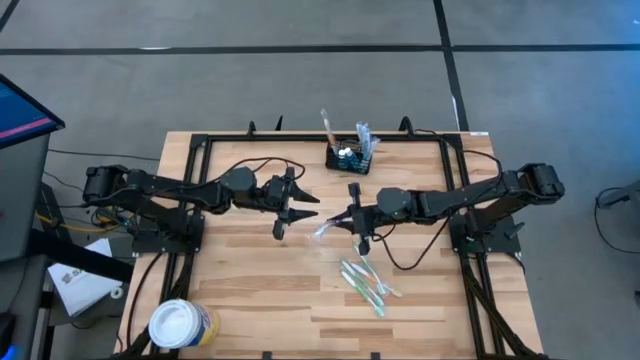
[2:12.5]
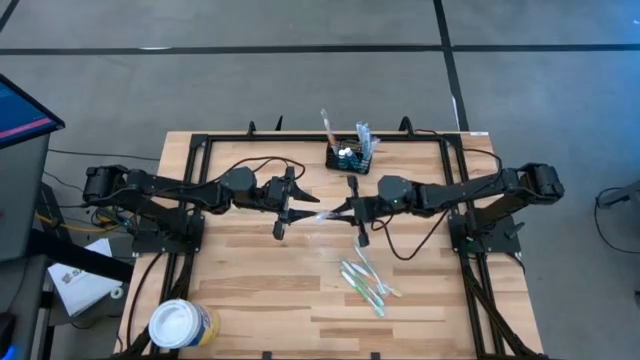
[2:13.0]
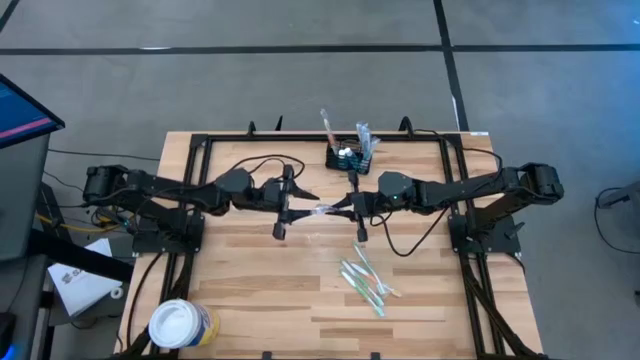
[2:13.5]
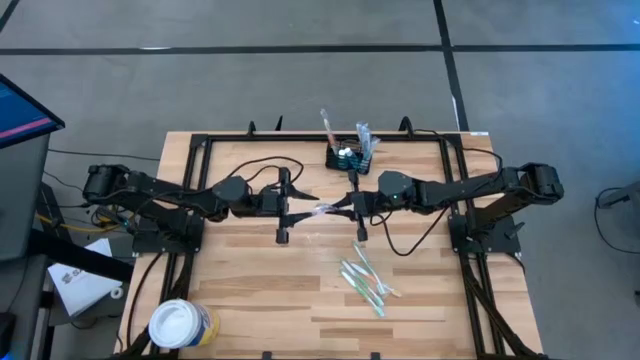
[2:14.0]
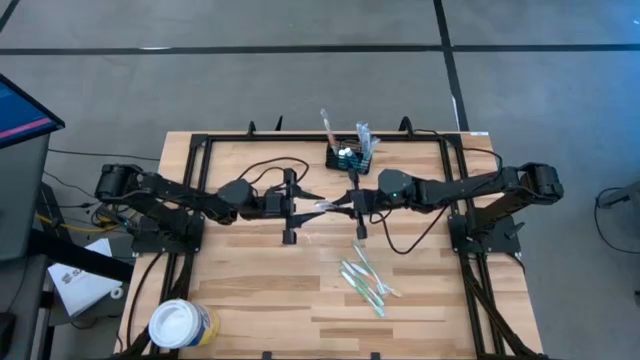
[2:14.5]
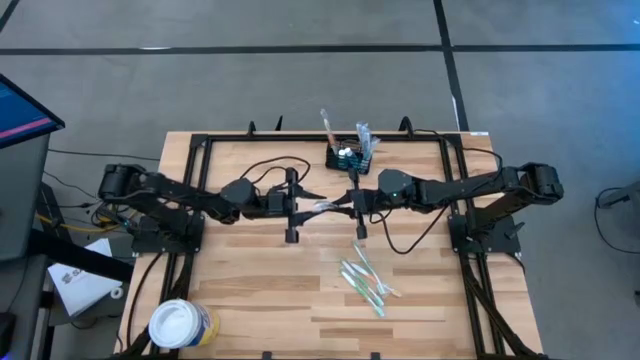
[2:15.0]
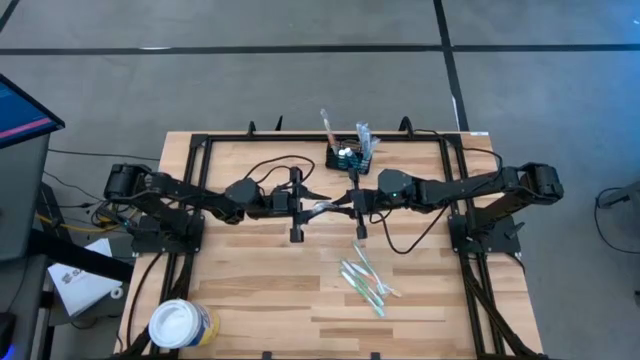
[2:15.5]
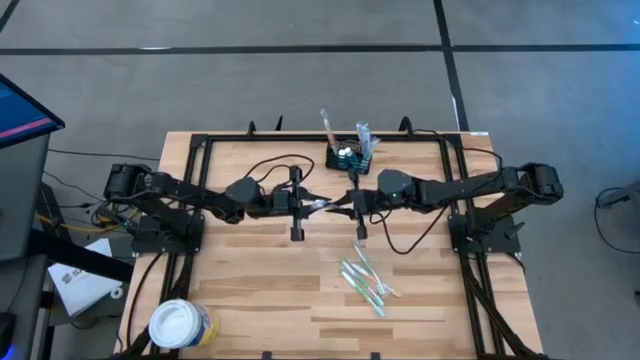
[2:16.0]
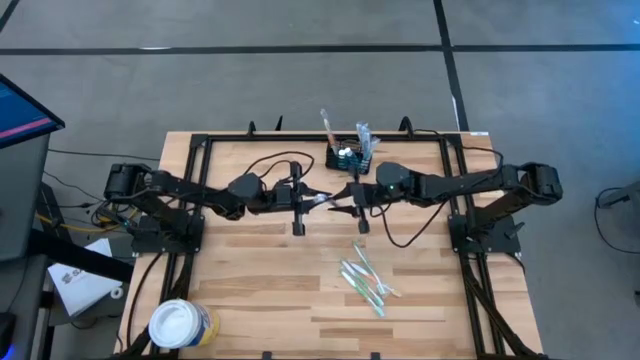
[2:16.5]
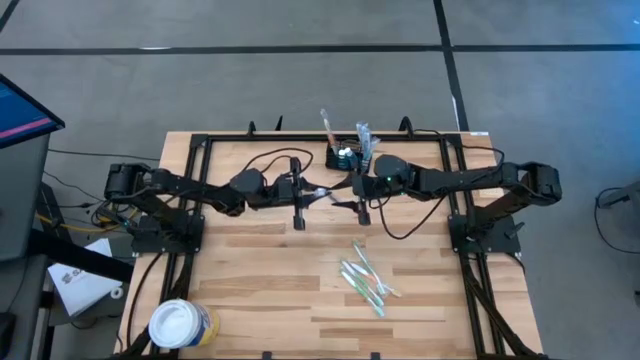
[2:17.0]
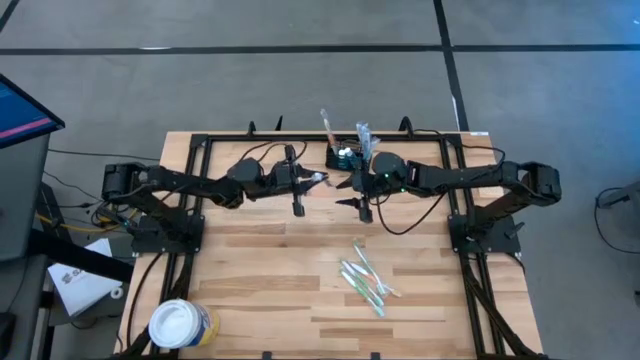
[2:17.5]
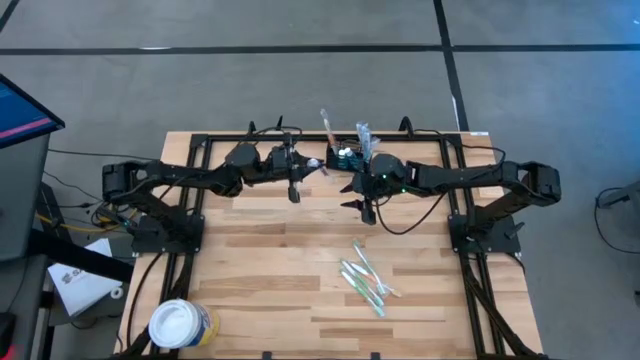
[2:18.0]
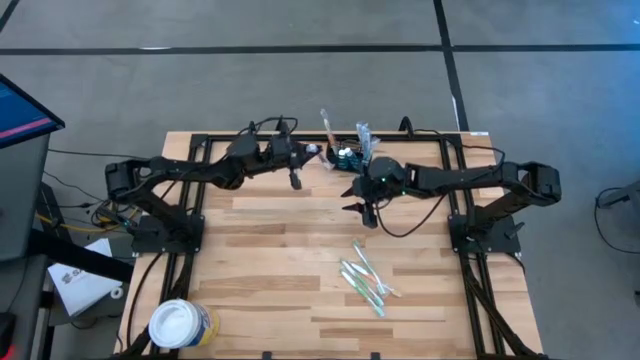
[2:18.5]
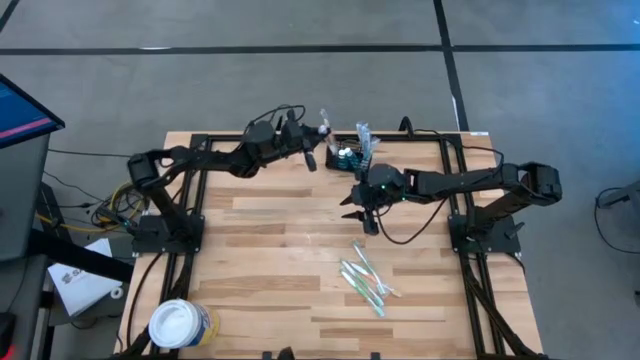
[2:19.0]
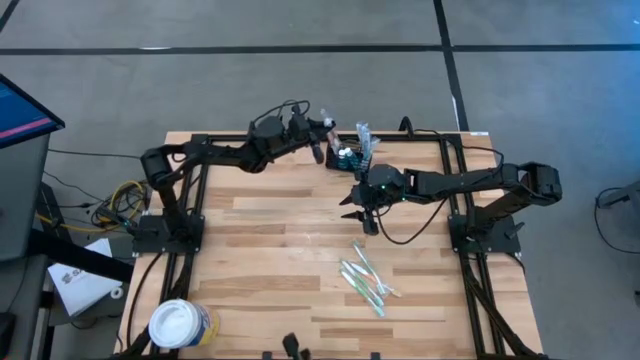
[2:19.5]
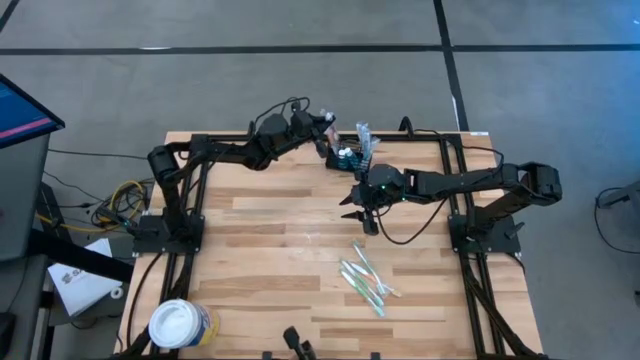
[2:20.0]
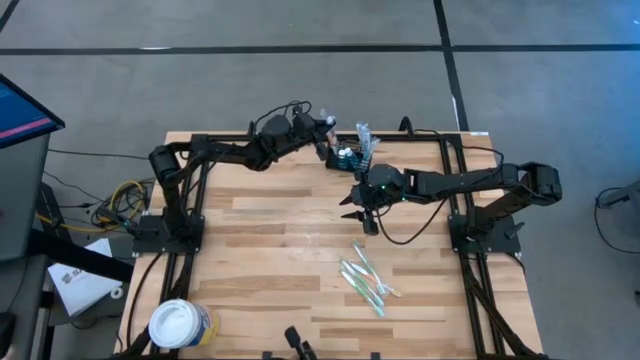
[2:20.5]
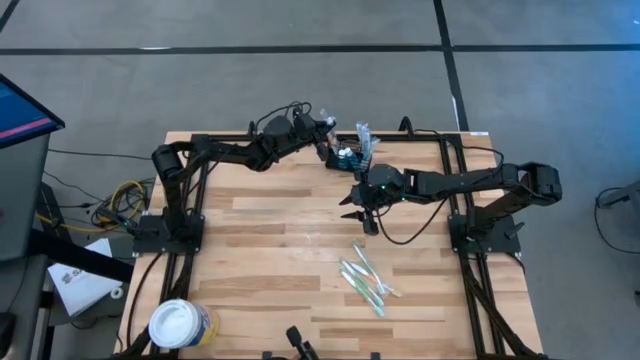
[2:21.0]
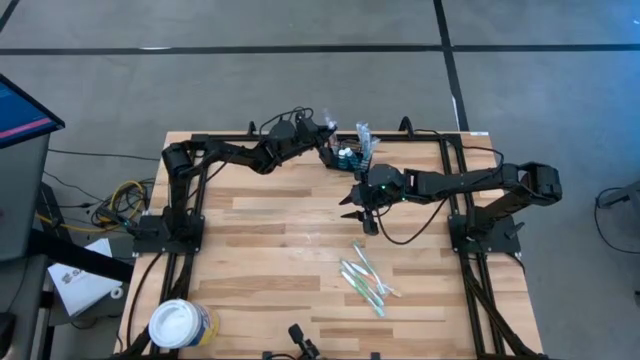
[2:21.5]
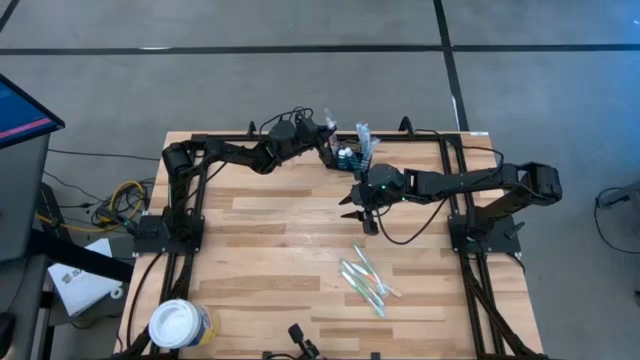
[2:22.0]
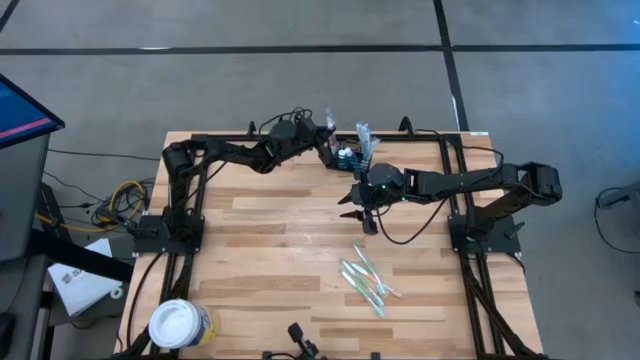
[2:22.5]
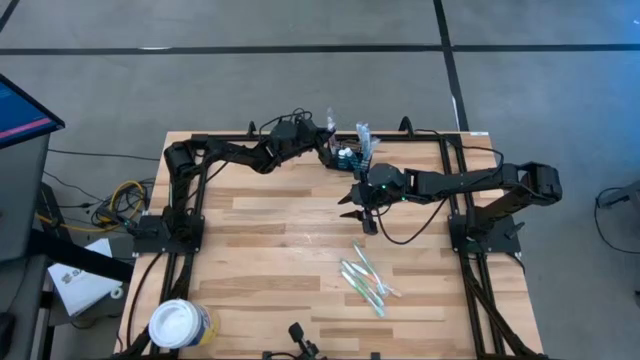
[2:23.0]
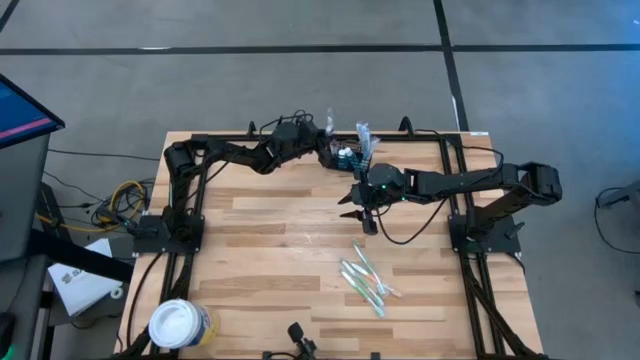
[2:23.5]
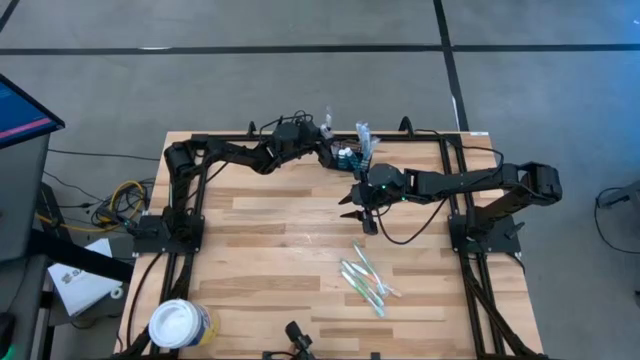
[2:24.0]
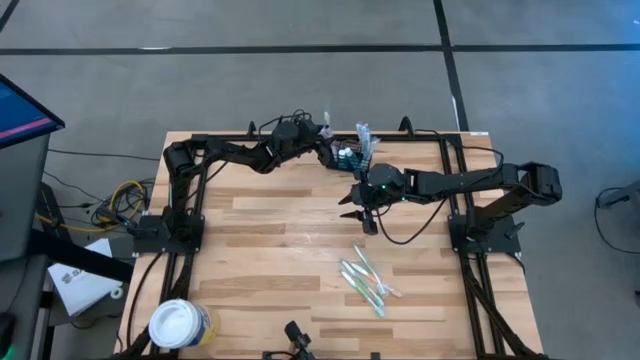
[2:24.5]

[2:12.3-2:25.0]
Task: Pick & Place toothbrushing station
Put the purple toothbrush into the mesh organizer

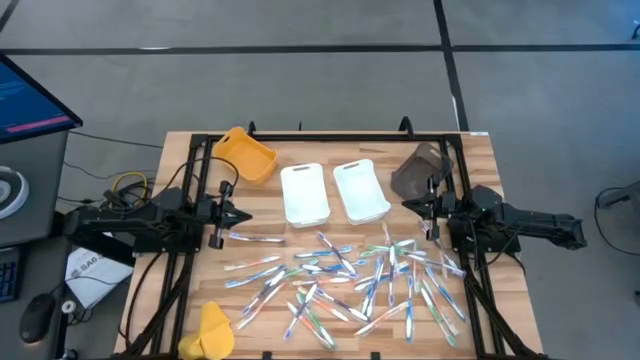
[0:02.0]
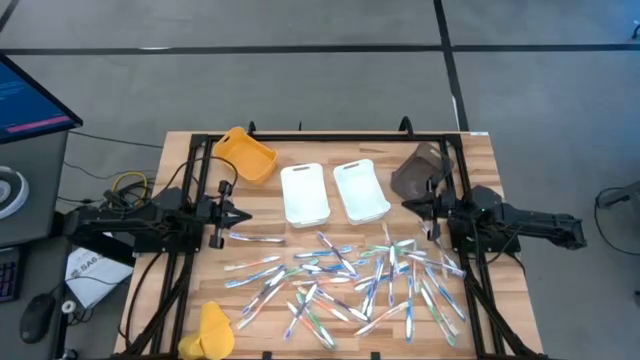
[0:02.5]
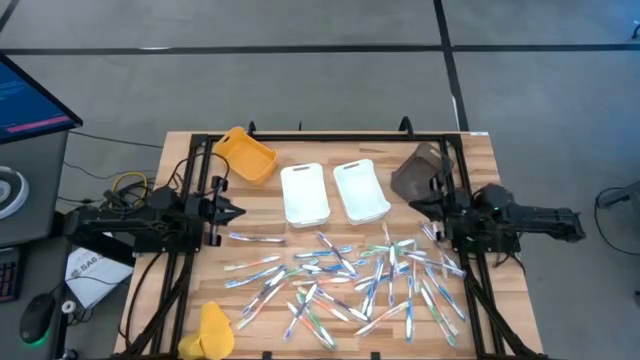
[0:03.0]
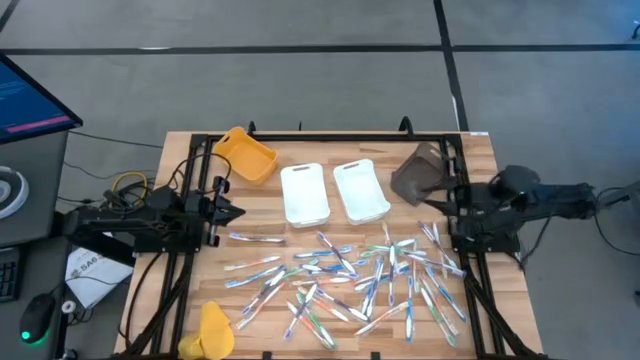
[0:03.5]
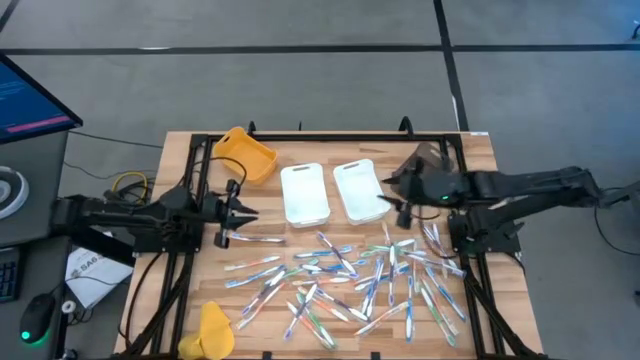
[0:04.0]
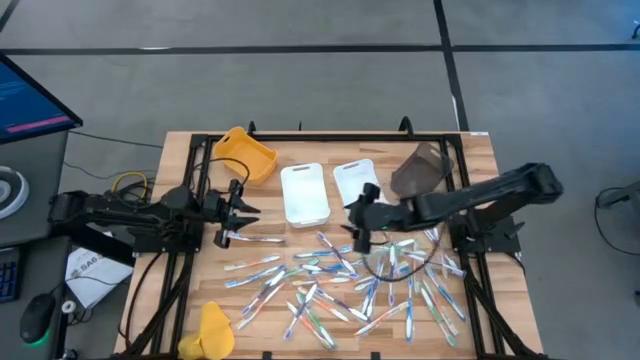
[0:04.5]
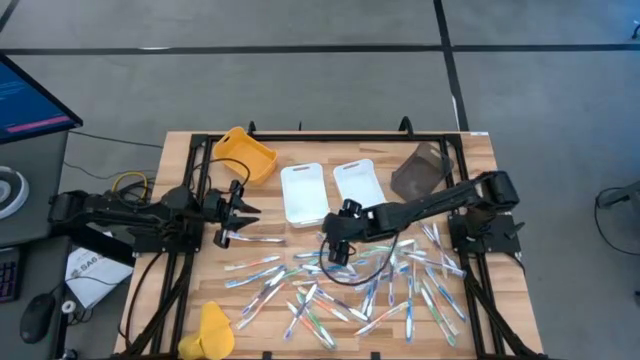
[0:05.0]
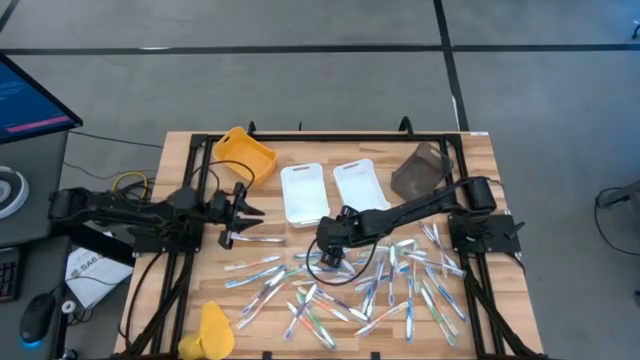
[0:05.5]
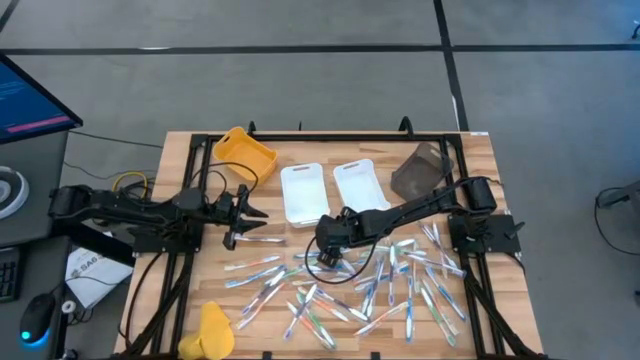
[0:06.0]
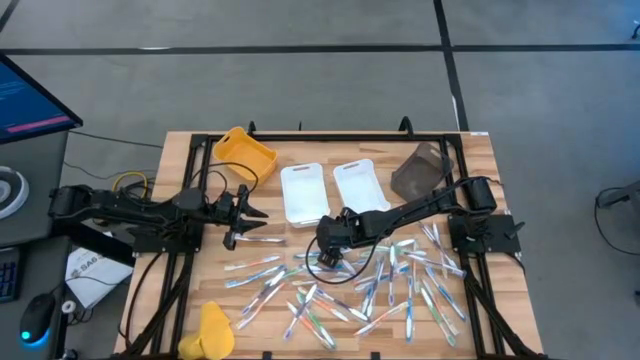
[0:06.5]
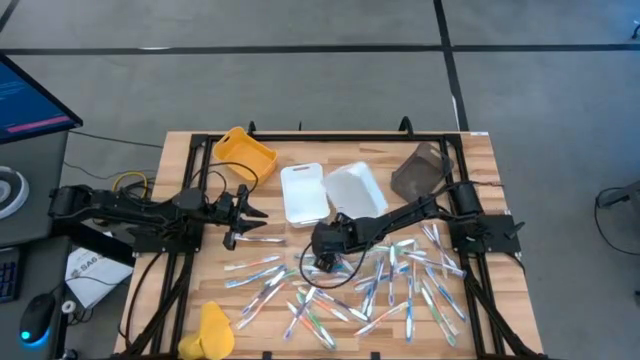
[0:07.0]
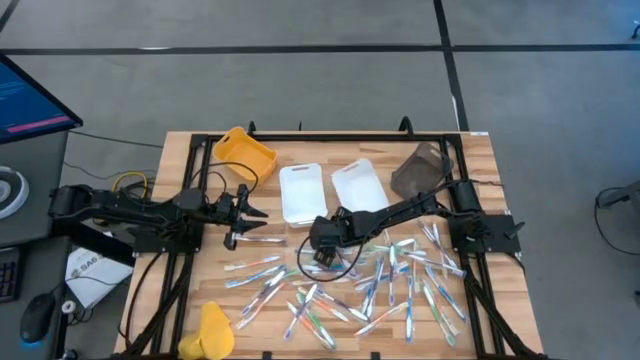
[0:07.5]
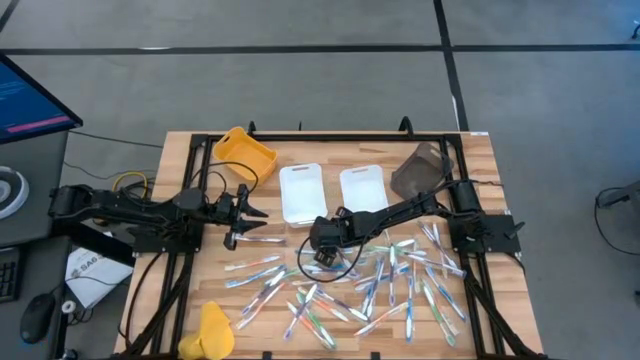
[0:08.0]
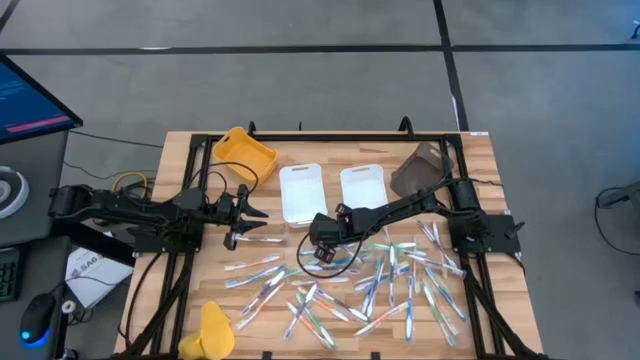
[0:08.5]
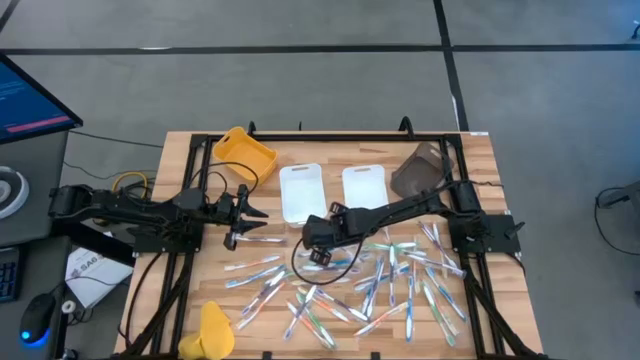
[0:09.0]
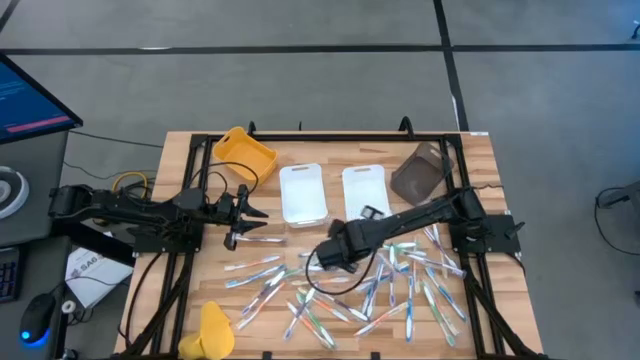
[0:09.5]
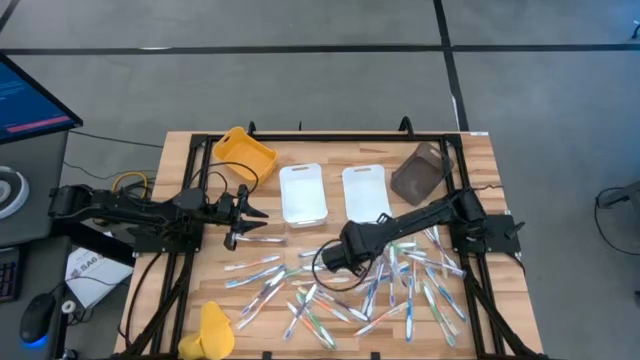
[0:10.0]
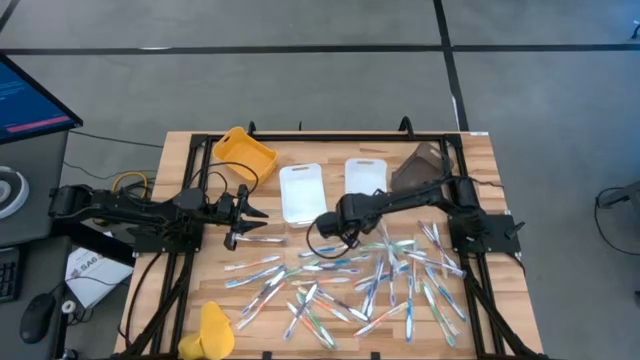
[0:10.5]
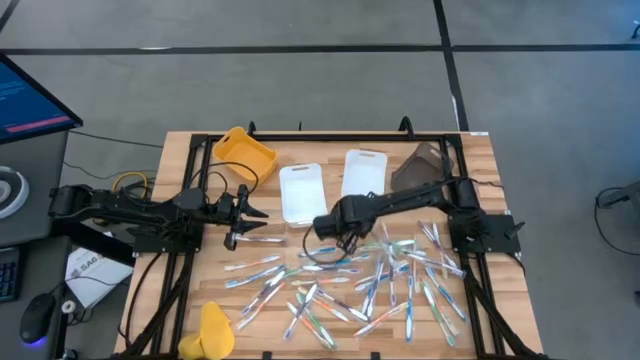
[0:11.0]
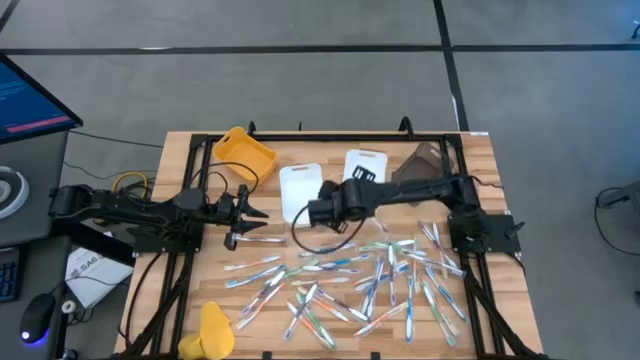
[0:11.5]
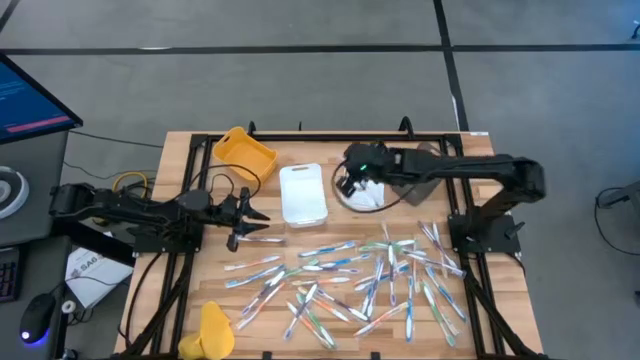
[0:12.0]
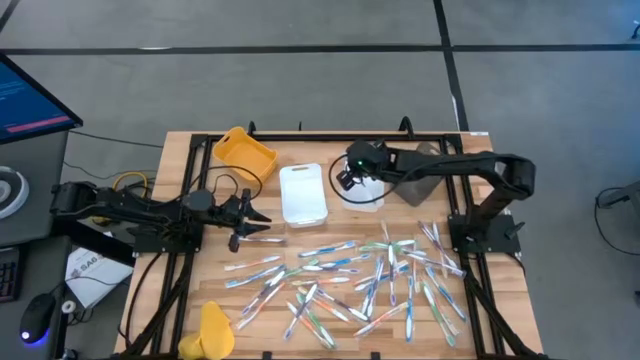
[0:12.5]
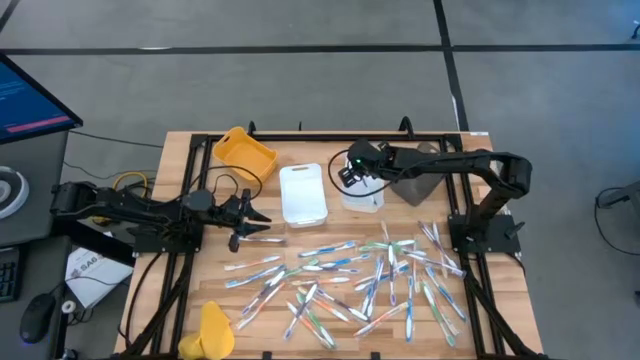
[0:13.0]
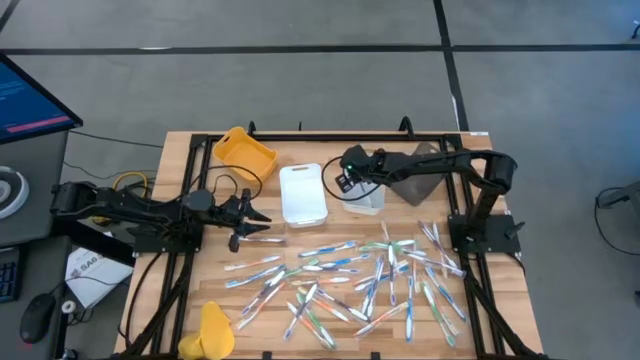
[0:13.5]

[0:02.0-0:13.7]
Task: Pick & Place Toothbrushes
Put the purple toothbrush into the right white bin
